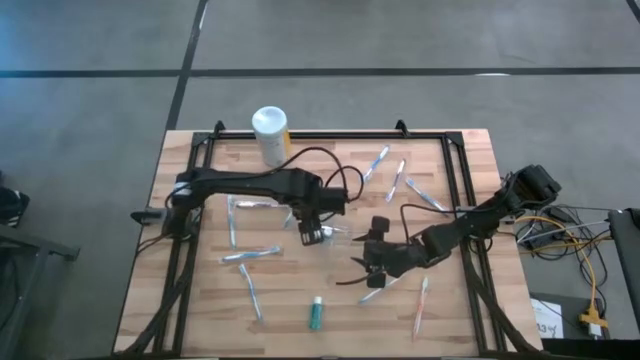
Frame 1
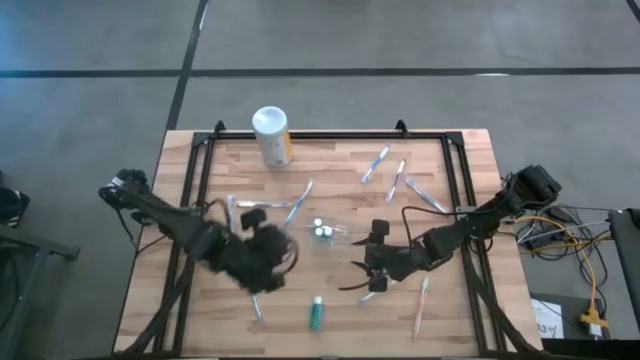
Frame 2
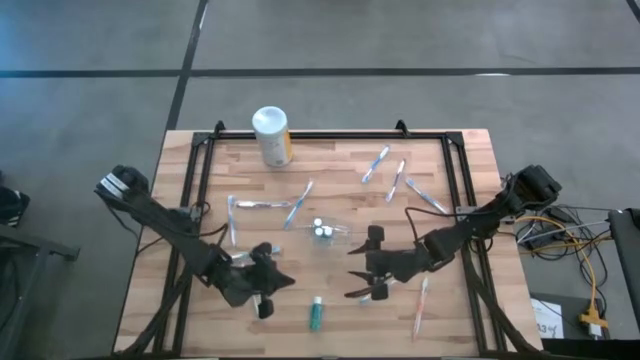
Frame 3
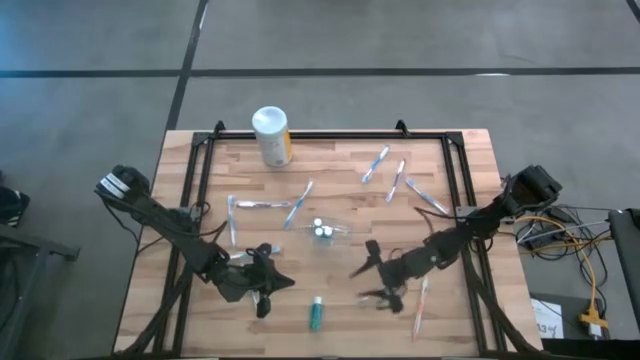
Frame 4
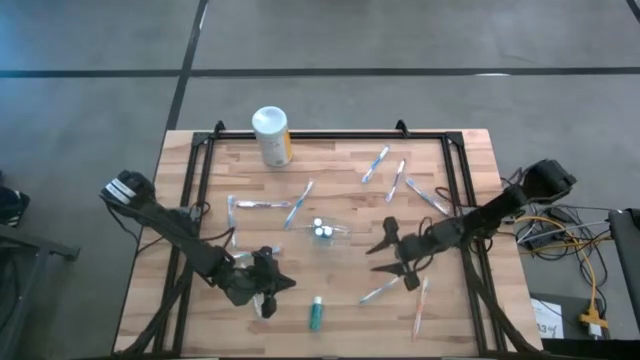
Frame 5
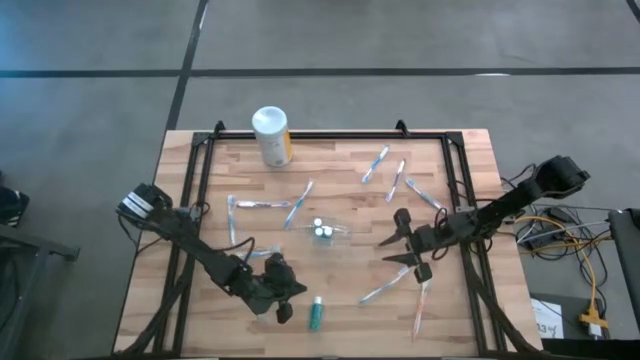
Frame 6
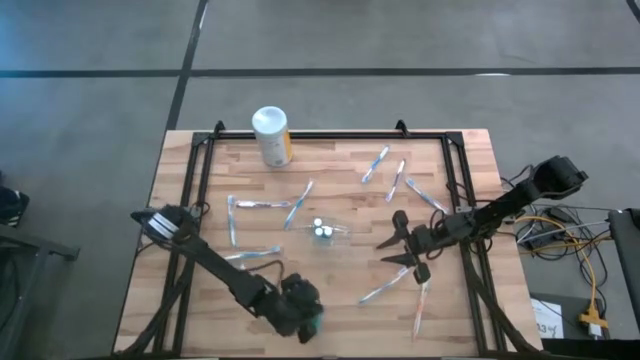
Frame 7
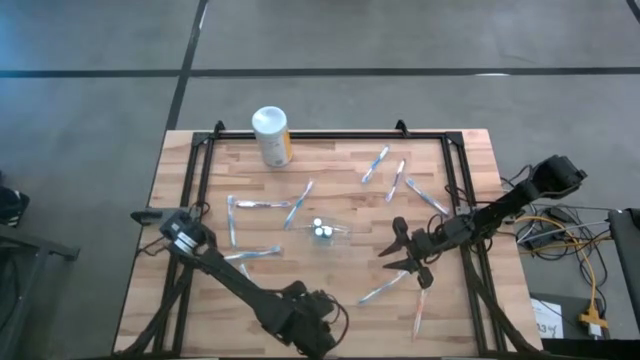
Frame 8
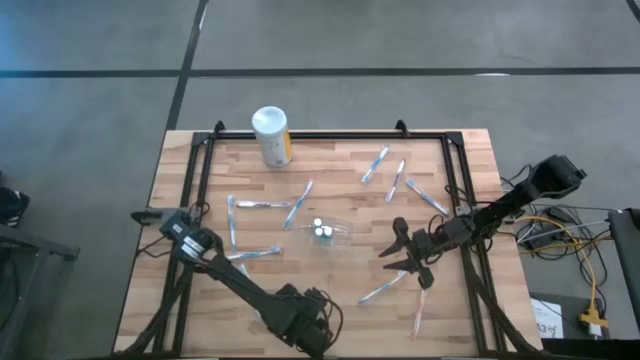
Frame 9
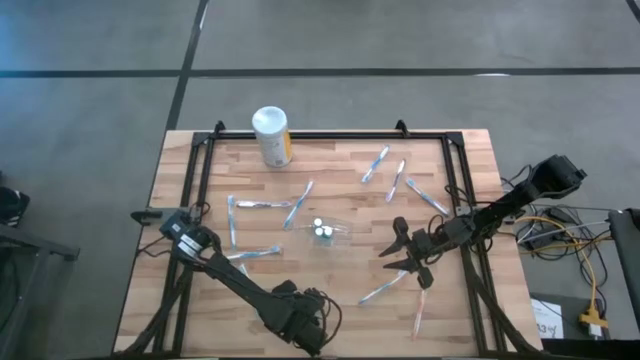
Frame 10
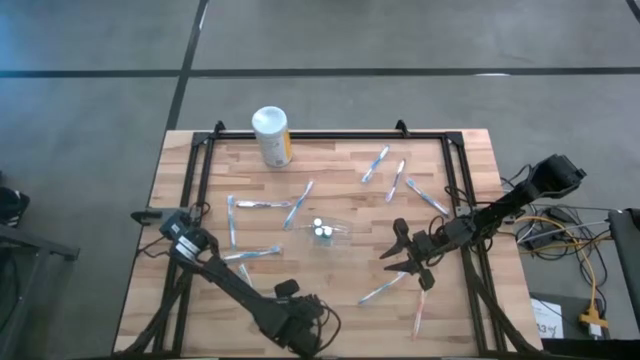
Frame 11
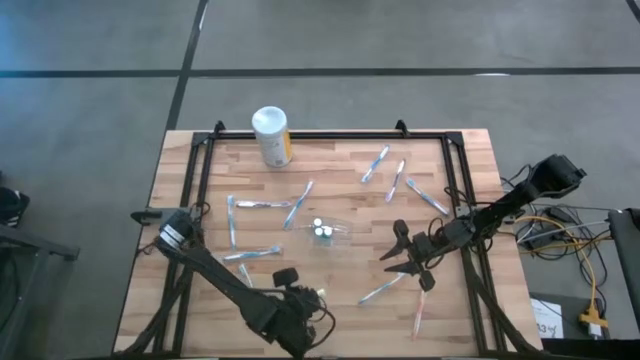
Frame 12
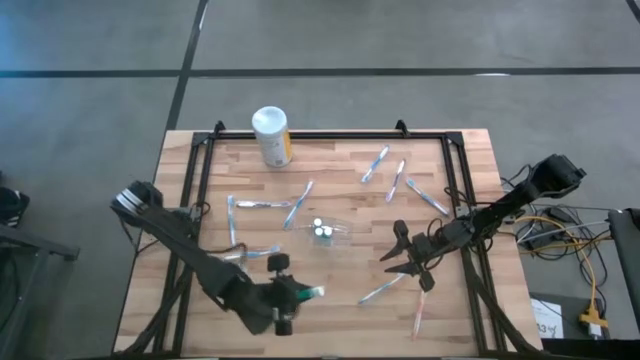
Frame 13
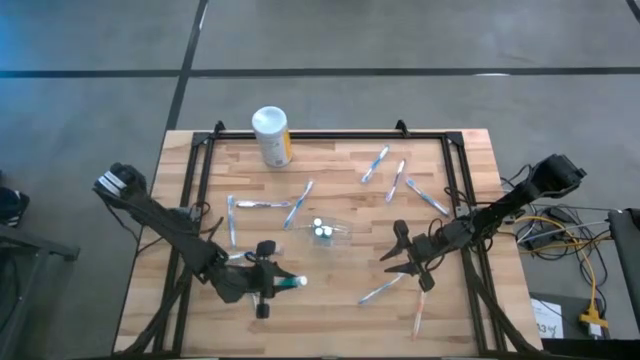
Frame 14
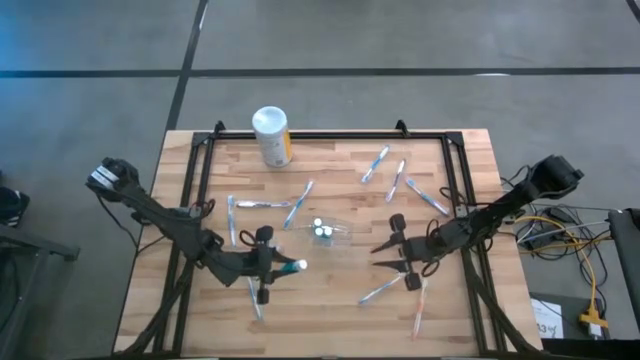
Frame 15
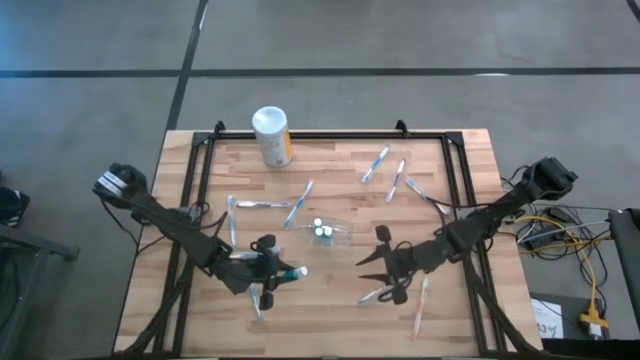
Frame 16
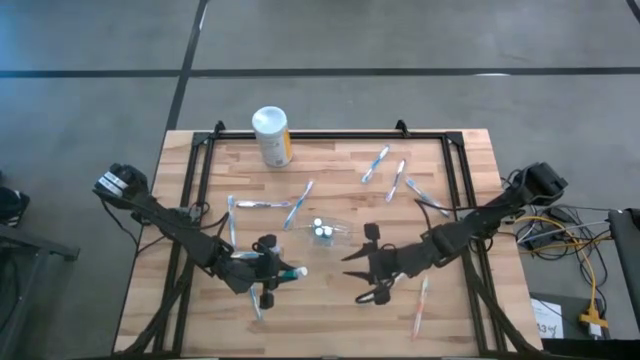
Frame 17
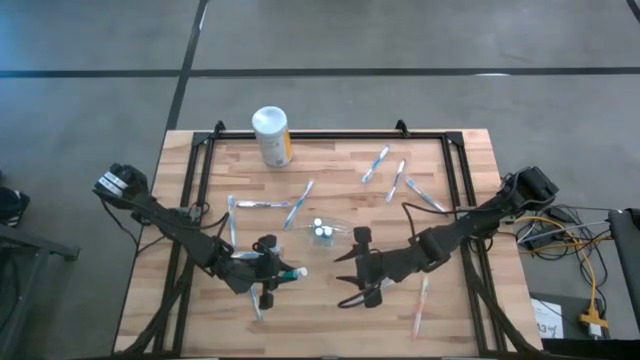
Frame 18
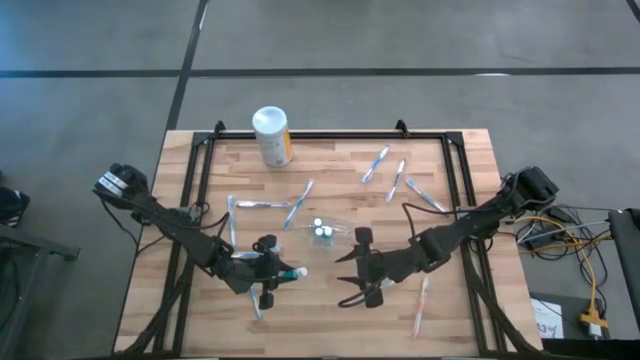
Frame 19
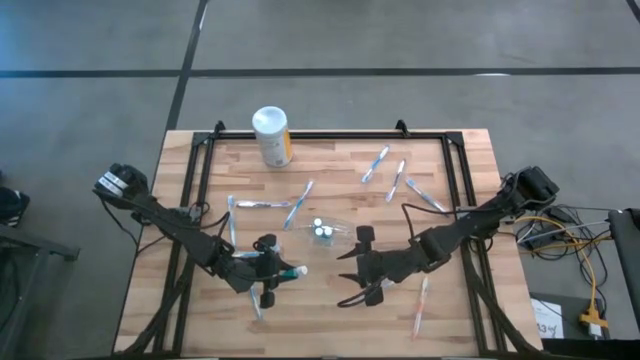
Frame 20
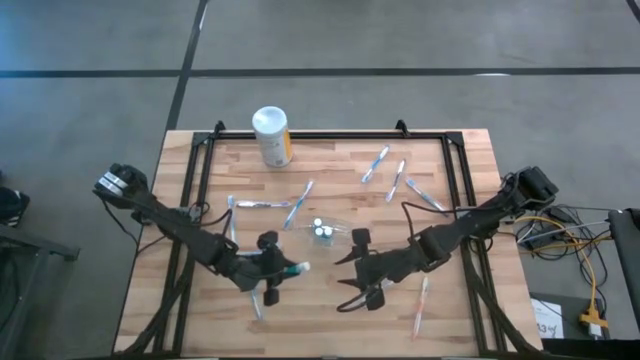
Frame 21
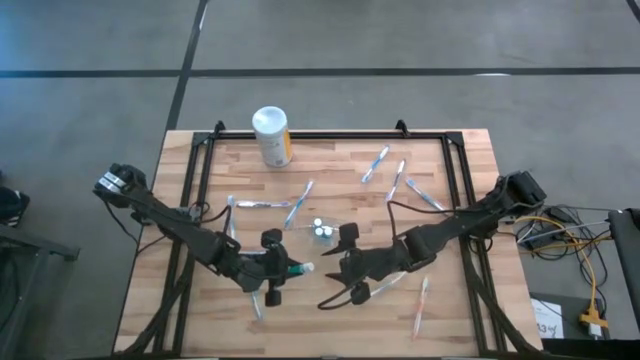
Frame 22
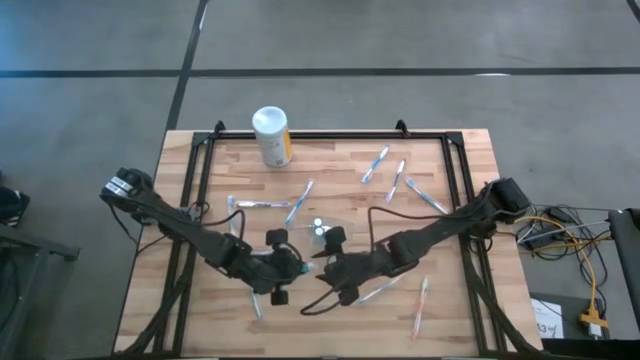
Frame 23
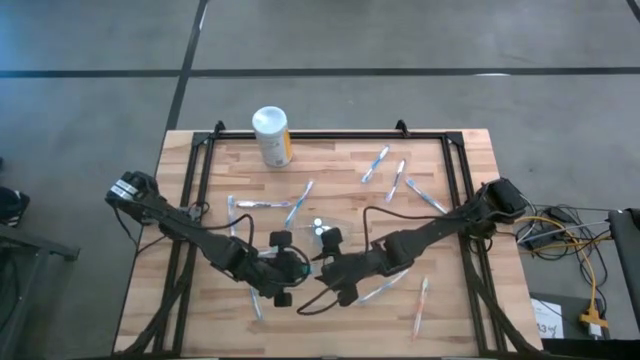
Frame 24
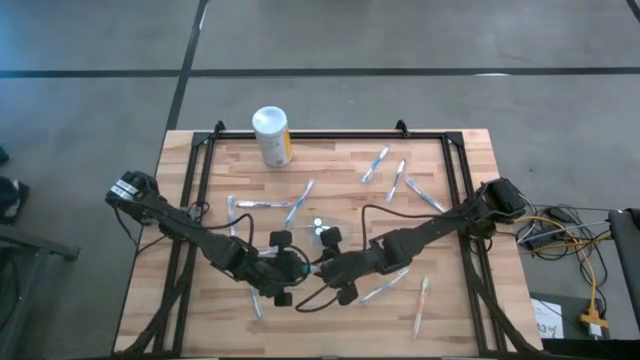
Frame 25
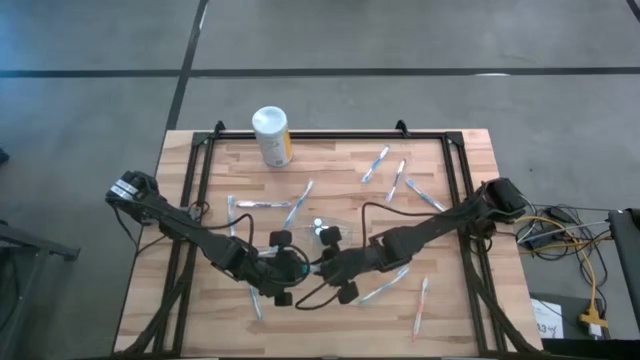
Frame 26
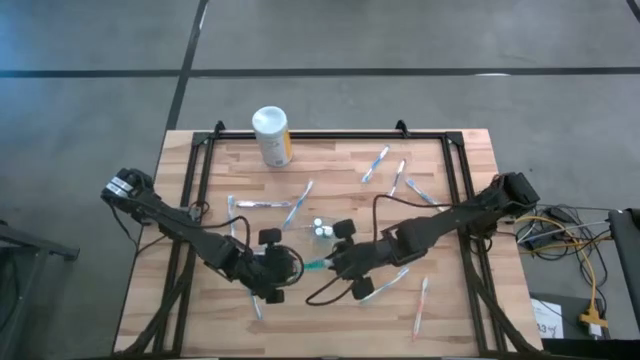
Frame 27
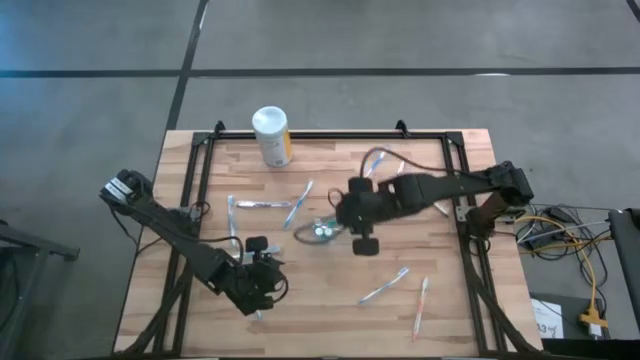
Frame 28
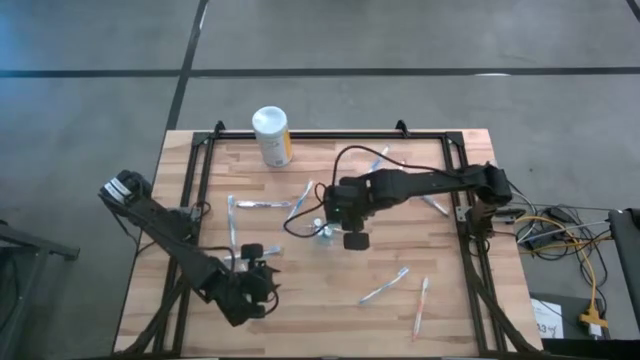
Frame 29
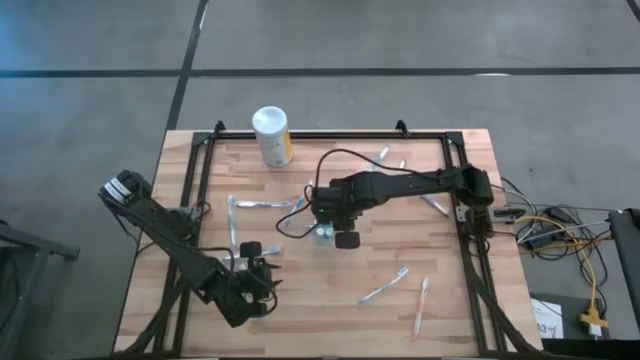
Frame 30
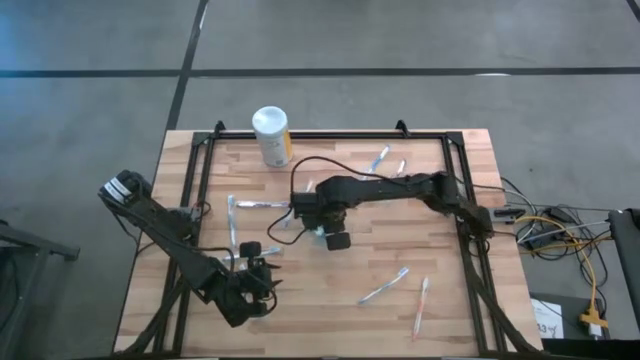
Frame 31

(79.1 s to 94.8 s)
Task: Pick & Place toothbrushing station
Put the mouthwash into the transparent organizer

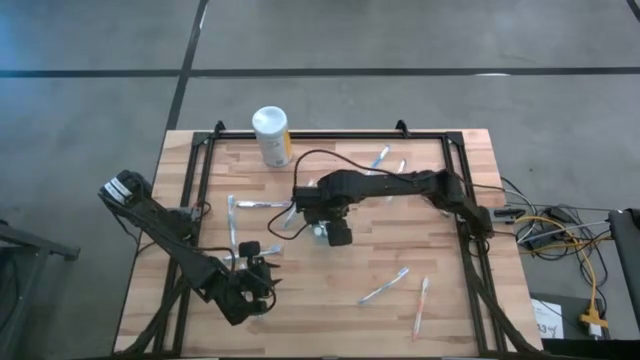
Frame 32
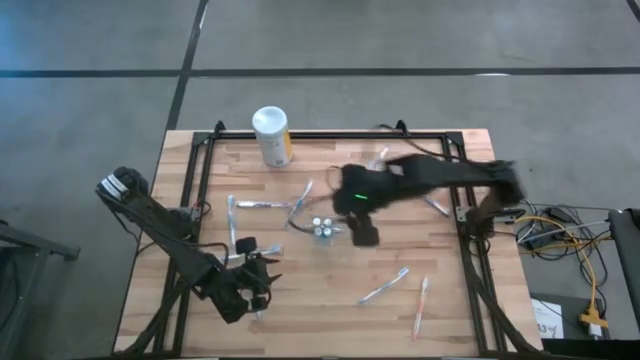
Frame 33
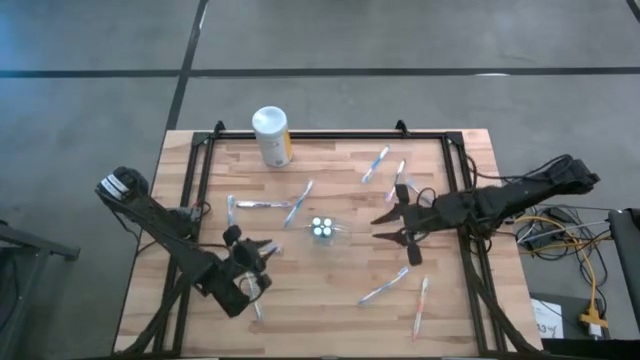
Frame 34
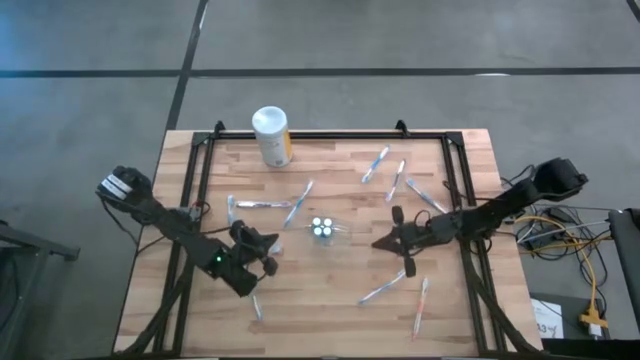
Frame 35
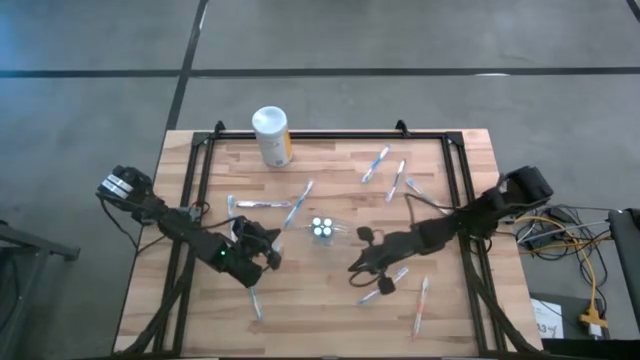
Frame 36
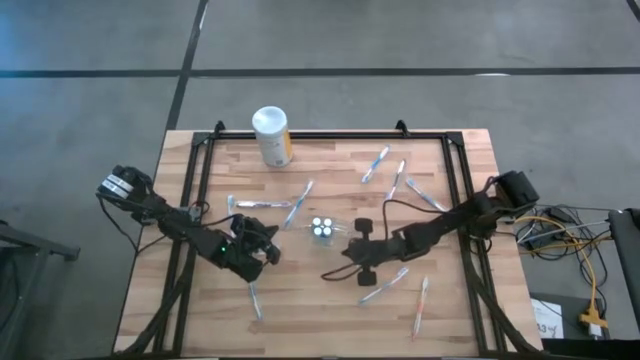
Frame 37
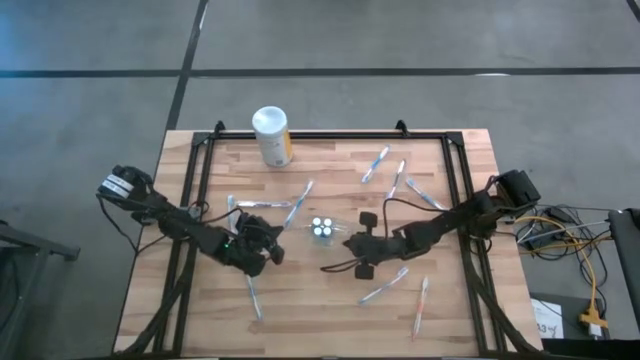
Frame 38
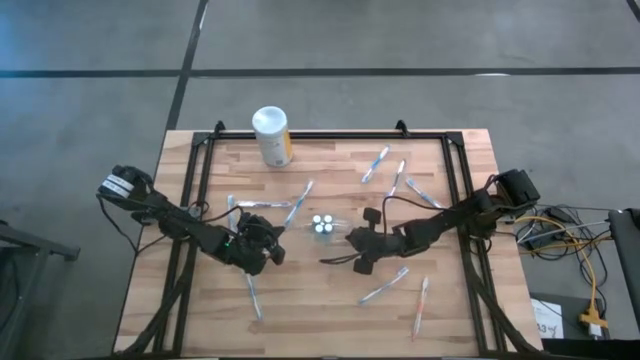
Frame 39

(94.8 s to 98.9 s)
Adjust the transparent organizer

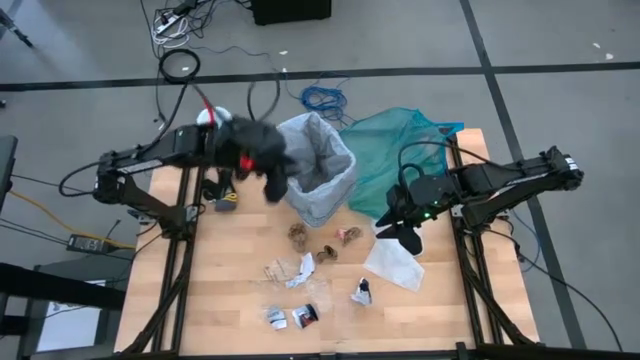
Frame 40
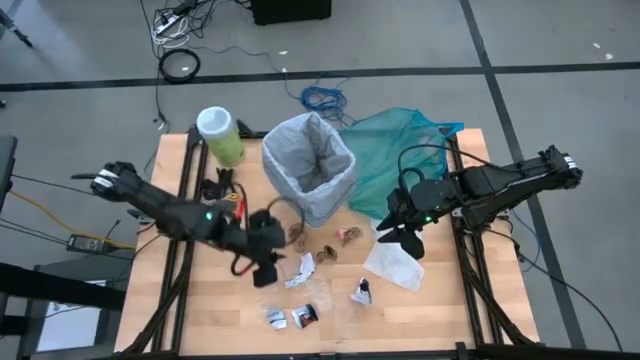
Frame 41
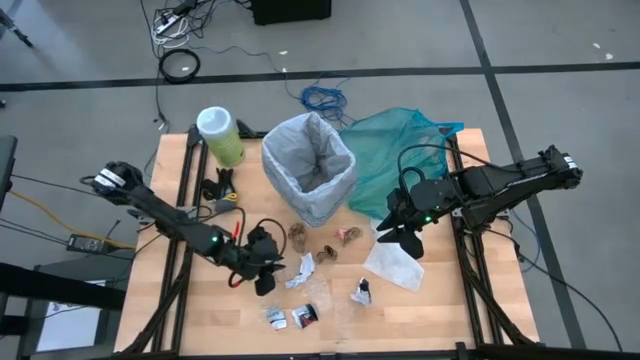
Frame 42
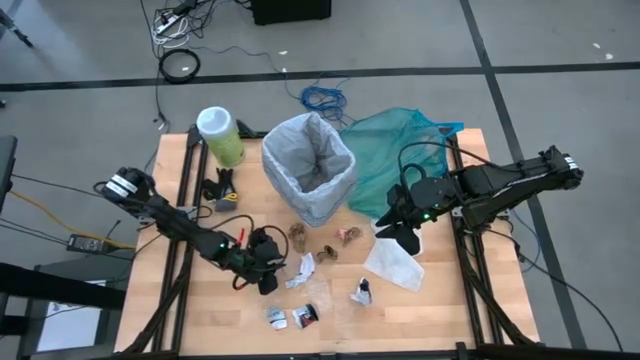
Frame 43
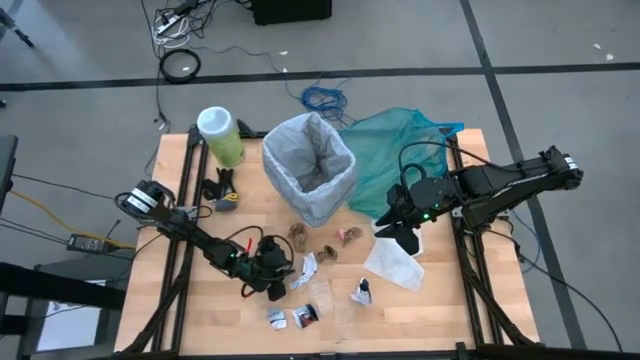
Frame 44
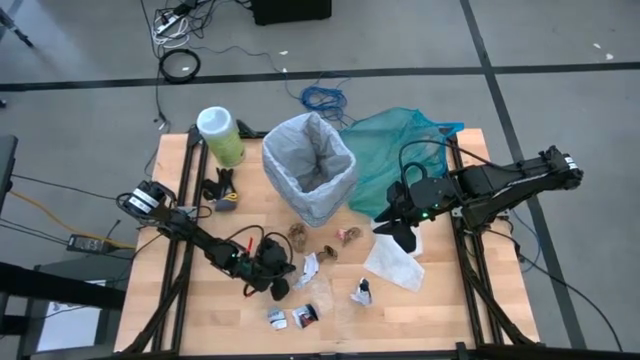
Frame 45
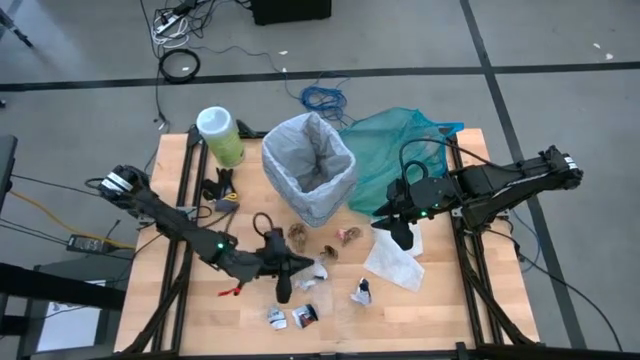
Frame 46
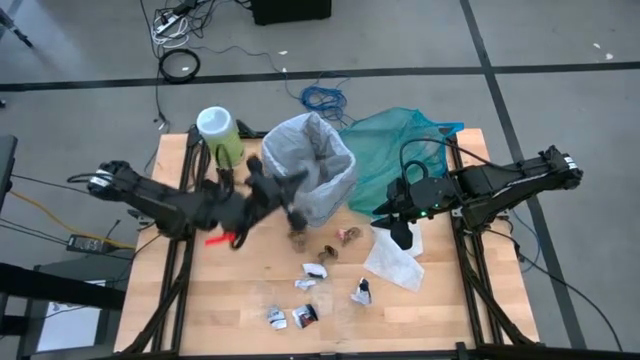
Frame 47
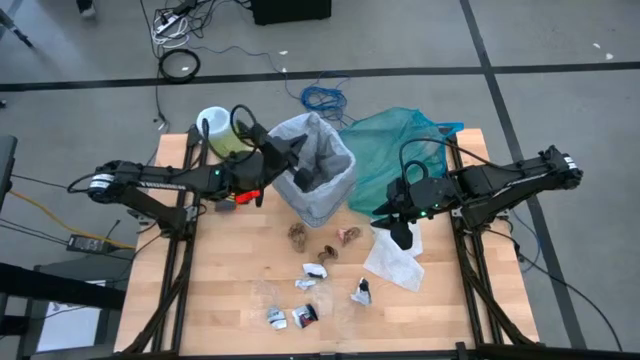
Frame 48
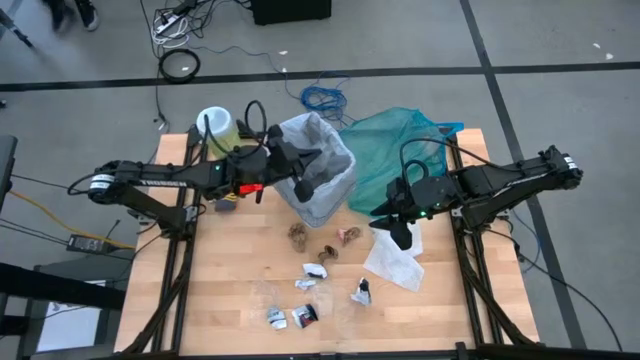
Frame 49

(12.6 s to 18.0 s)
Task: place trash/remove bag and relplace
Put the transparent plastic into the trash bin
